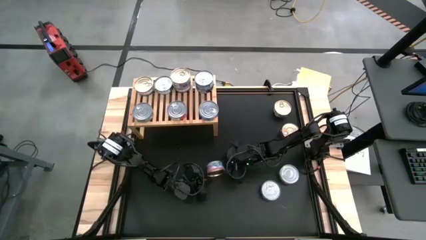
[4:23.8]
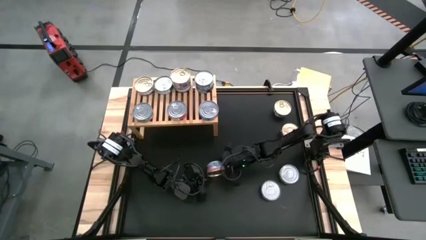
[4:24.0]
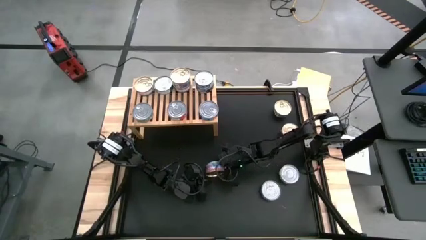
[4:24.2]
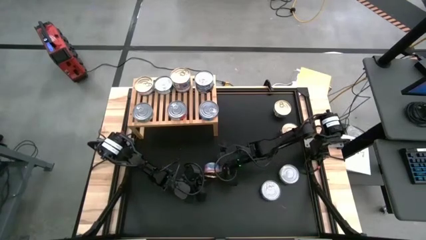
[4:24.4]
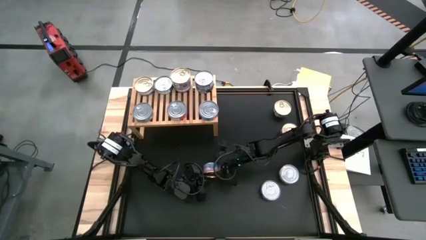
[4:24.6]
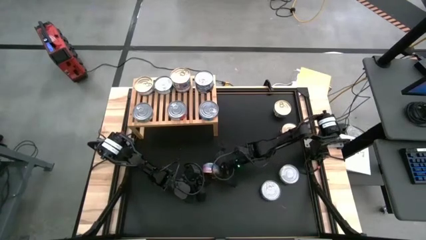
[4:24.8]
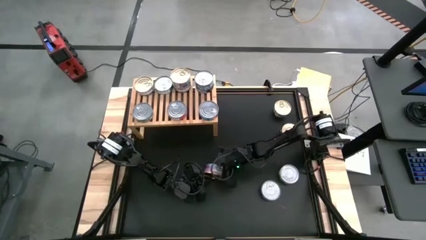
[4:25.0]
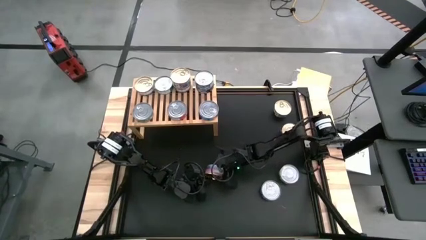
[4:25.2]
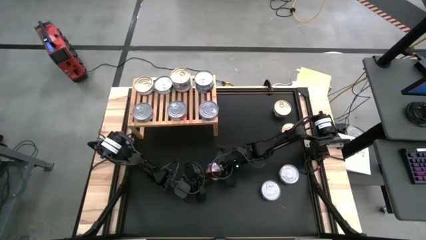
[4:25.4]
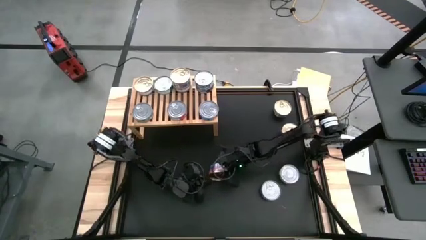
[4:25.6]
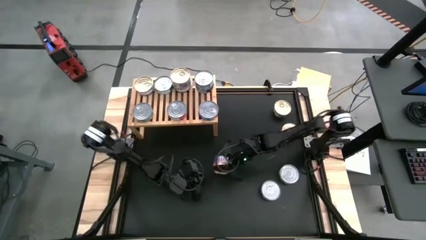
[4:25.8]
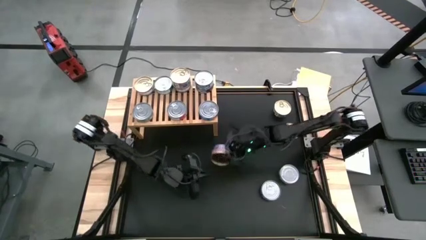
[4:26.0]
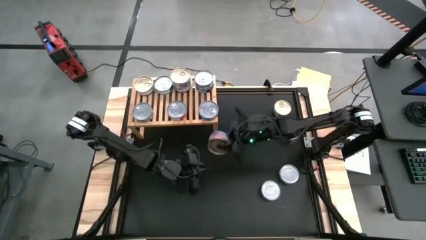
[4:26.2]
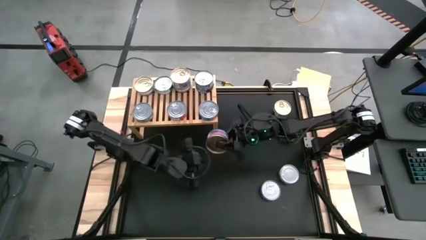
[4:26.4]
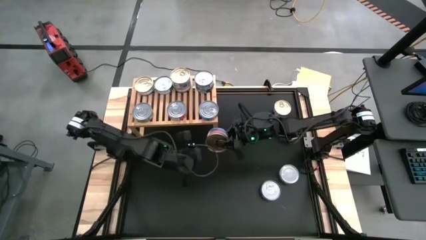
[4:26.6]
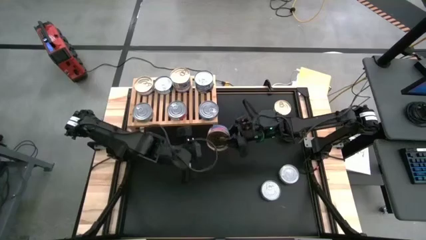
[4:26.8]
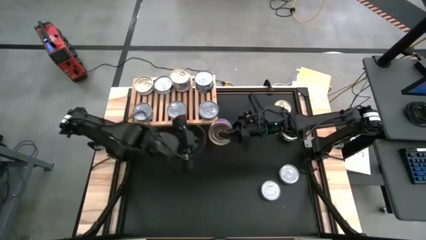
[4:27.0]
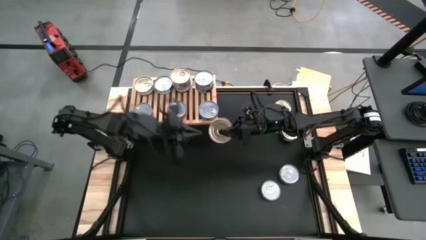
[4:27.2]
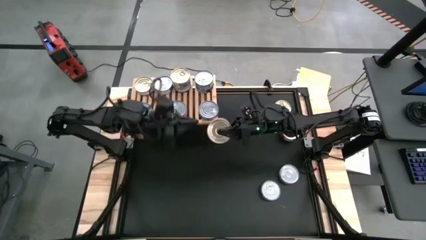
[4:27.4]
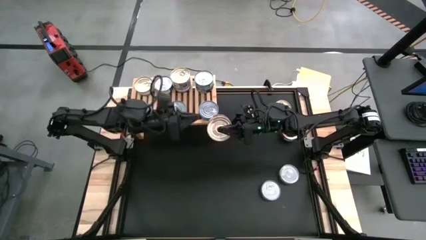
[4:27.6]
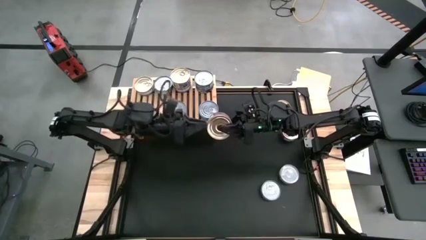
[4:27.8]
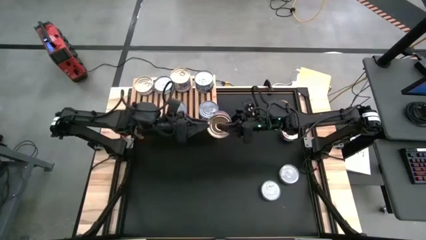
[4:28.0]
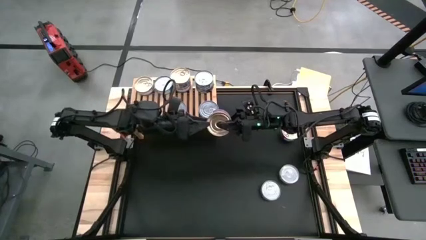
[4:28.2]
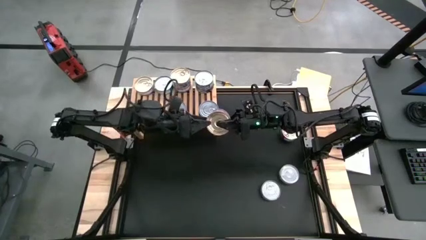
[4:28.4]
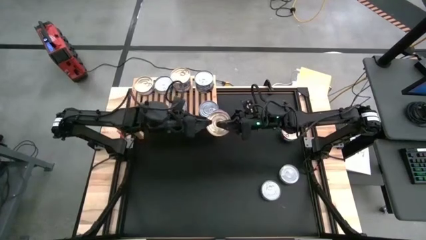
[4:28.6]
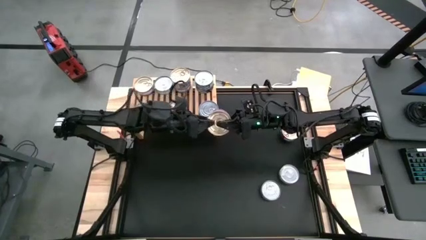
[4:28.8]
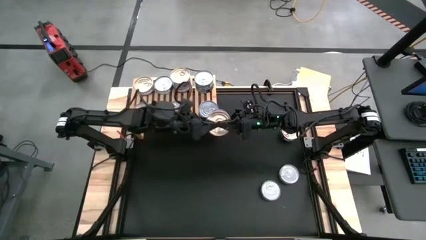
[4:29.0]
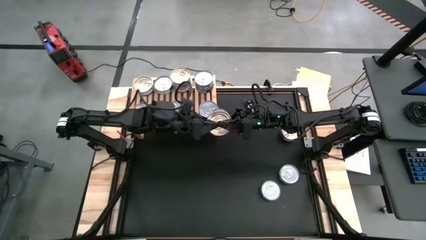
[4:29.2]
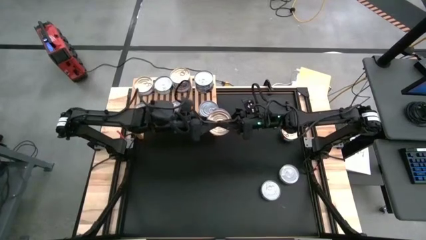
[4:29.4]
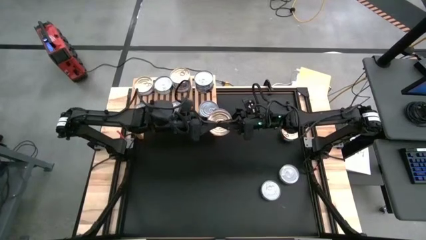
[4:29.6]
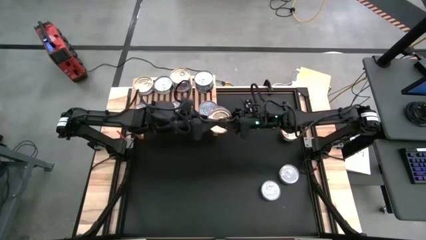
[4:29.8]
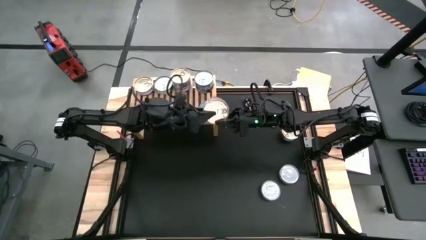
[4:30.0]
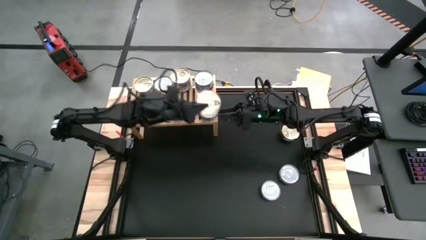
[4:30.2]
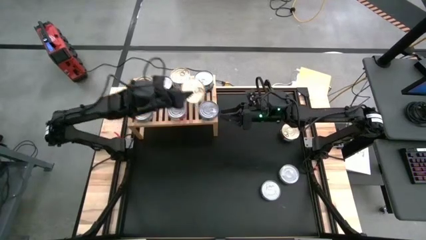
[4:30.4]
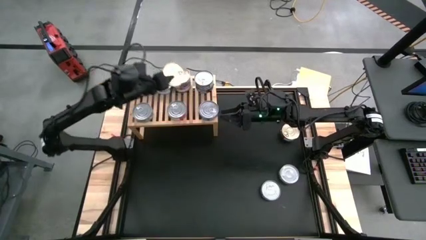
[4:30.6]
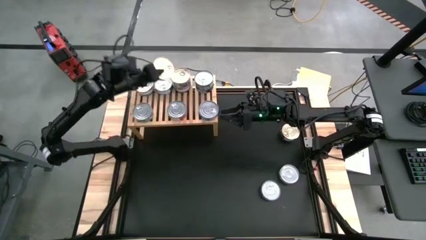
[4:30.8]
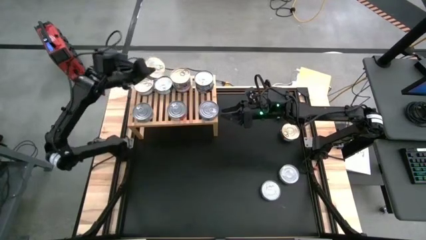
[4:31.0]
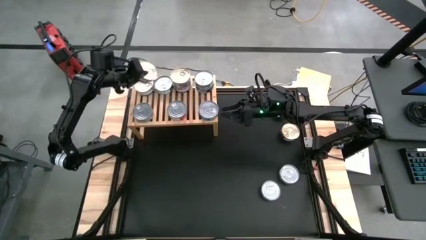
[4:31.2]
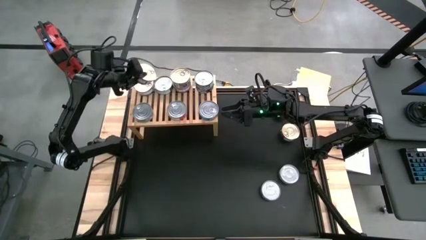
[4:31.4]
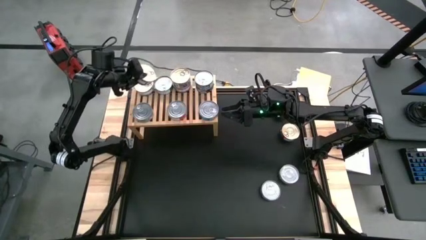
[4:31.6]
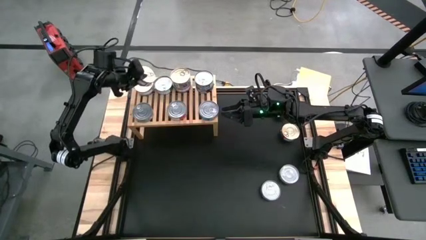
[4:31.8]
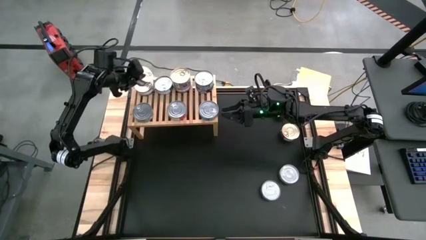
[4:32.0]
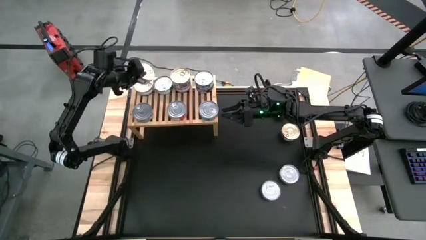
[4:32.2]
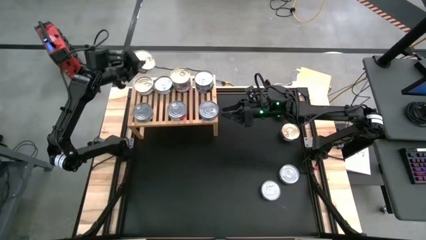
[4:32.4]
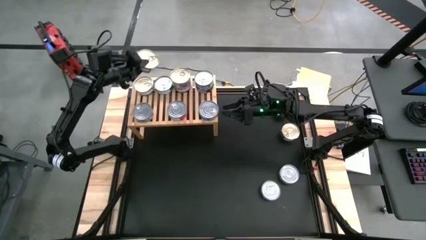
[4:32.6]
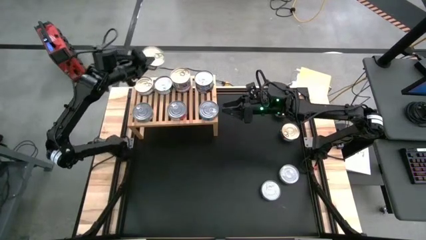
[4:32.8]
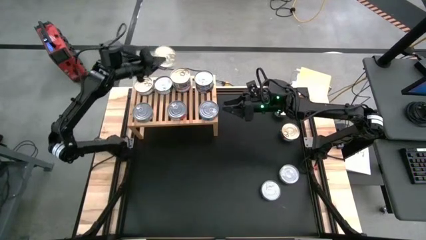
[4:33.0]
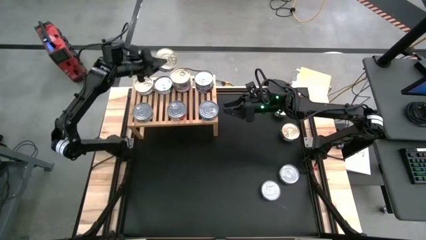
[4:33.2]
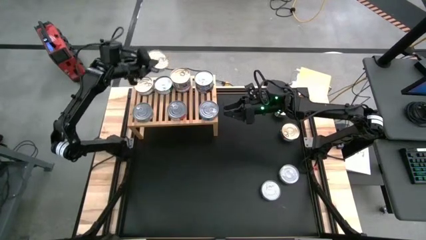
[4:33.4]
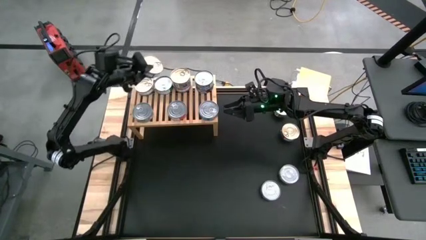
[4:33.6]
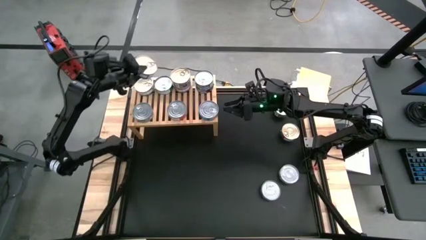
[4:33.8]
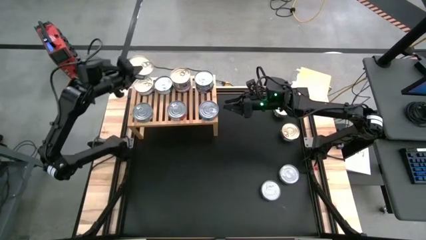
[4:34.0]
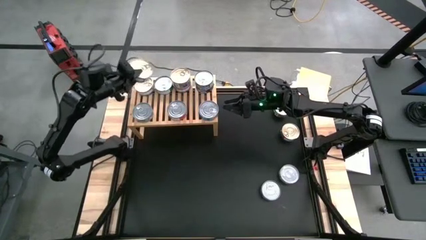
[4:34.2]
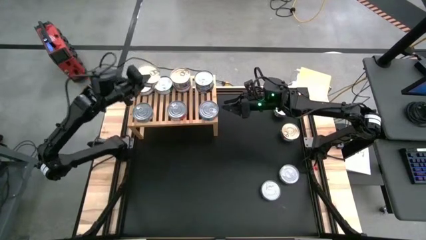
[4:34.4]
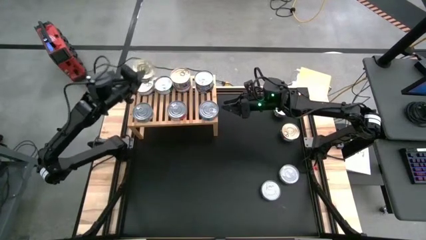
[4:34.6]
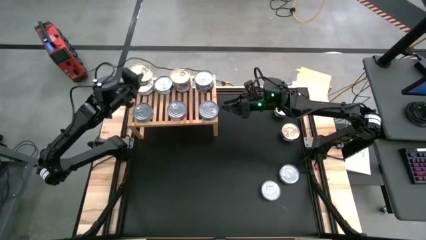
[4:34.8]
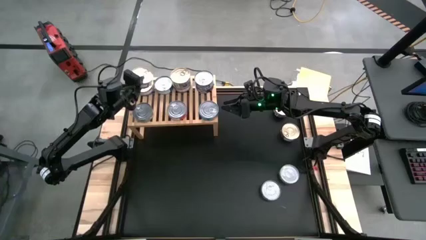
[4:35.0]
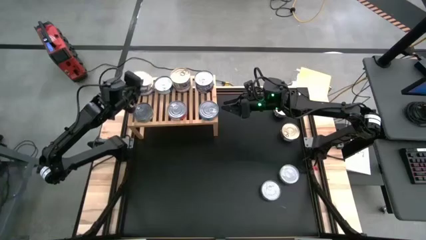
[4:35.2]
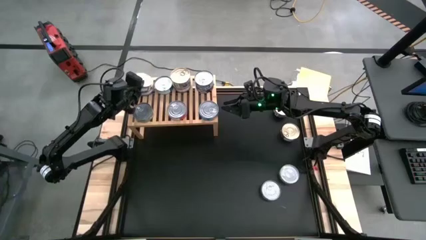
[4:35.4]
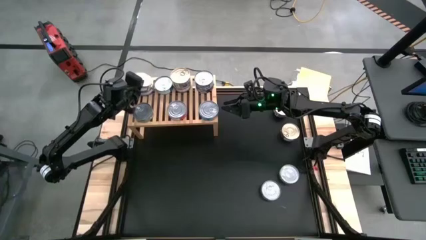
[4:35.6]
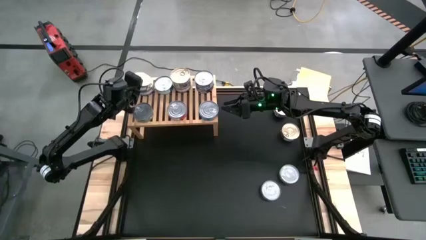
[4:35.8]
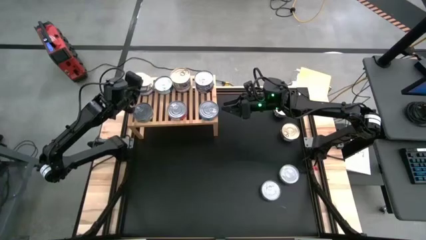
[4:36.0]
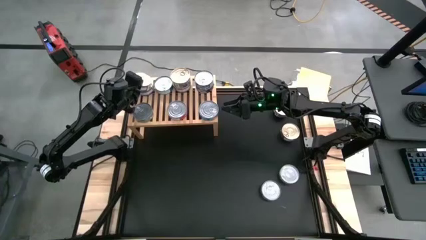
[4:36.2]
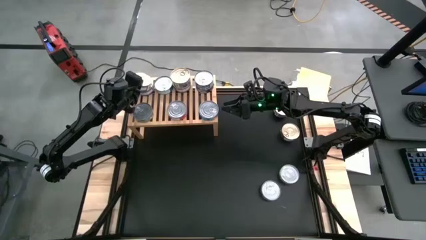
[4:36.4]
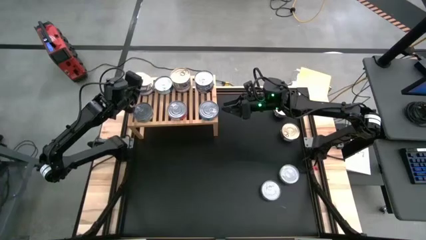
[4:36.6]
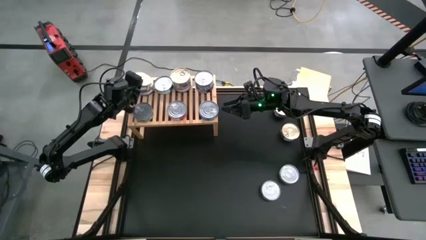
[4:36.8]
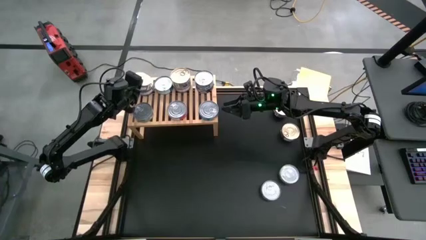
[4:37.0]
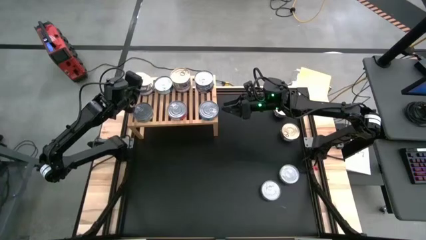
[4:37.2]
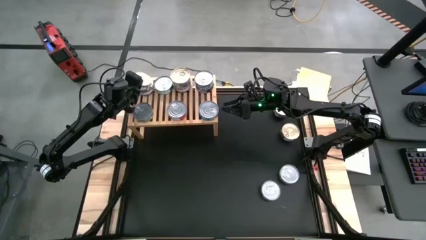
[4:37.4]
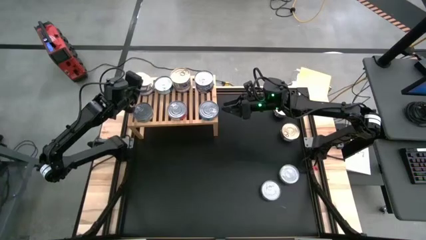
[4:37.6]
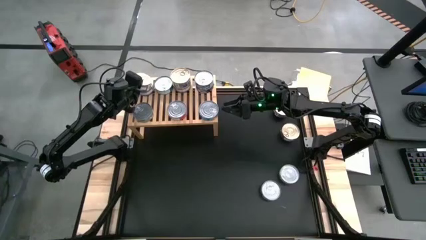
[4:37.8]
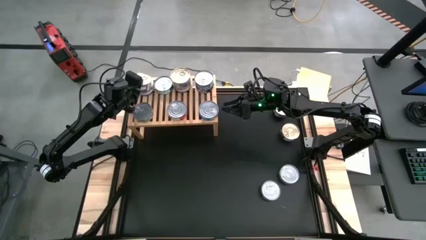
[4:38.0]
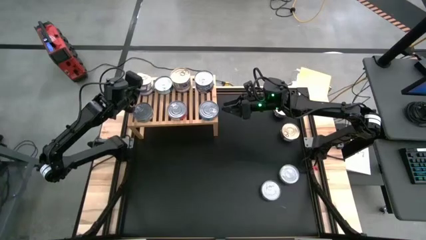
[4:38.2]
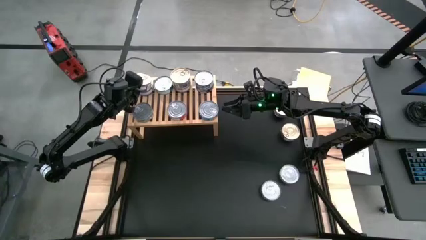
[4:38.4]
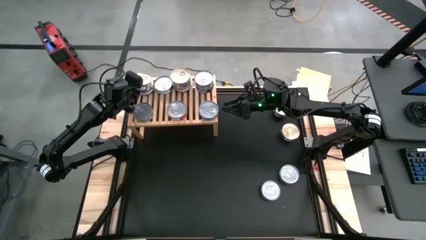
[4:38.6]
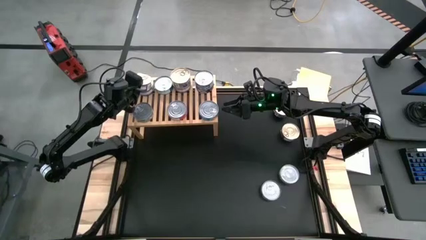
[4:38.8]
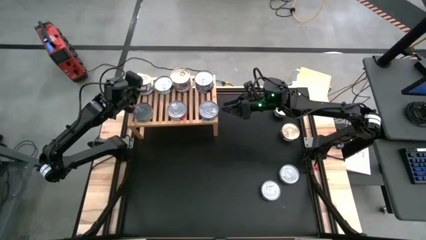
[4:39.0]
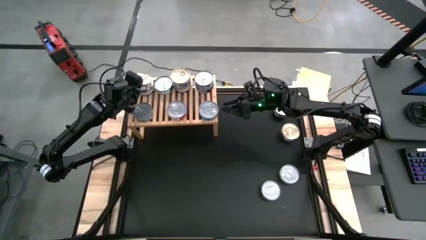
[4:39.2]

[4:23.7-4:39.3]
Task: Stack canned seafood by type on shelf
Stack the blue pink tuna can on top of the other blue pink tuna can on the shelf
